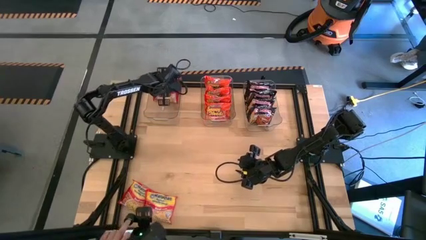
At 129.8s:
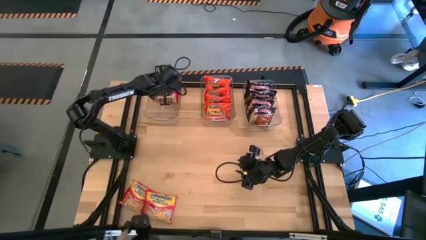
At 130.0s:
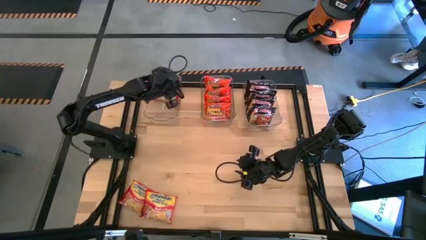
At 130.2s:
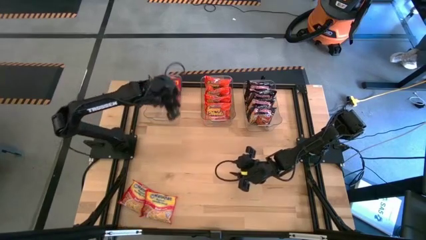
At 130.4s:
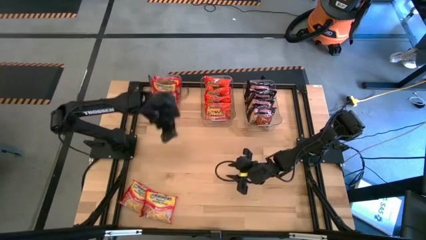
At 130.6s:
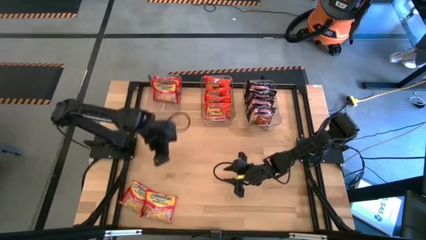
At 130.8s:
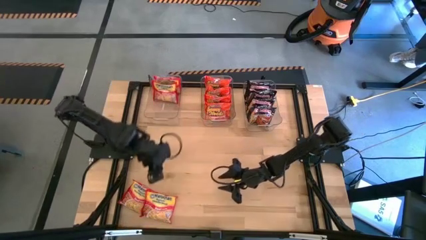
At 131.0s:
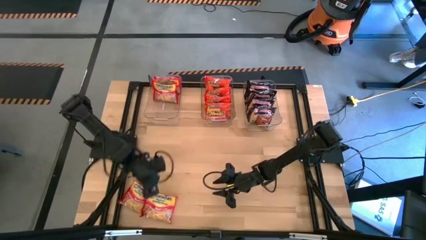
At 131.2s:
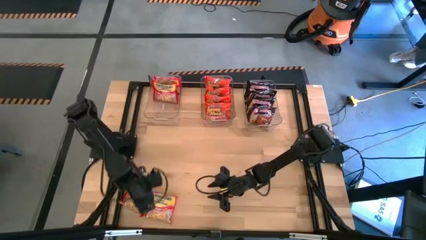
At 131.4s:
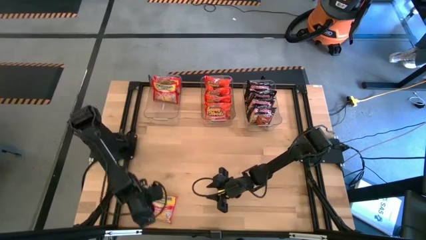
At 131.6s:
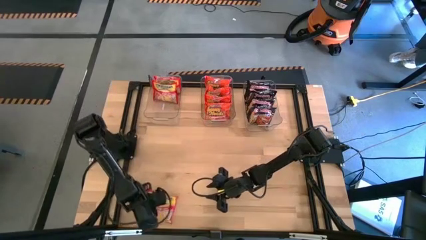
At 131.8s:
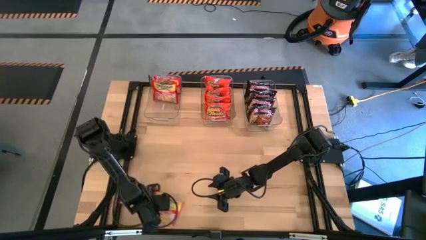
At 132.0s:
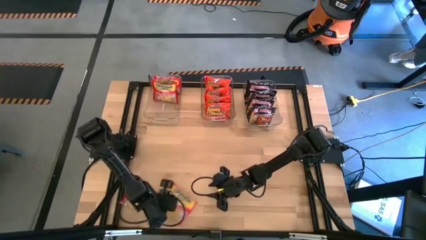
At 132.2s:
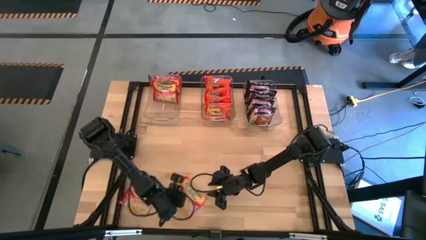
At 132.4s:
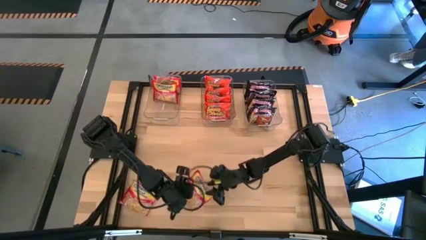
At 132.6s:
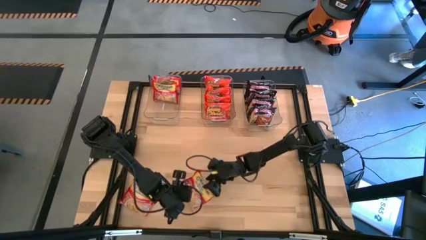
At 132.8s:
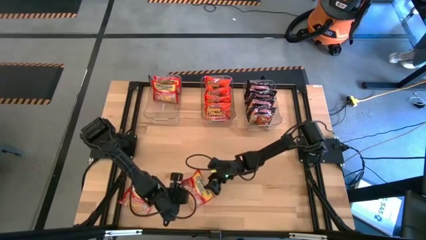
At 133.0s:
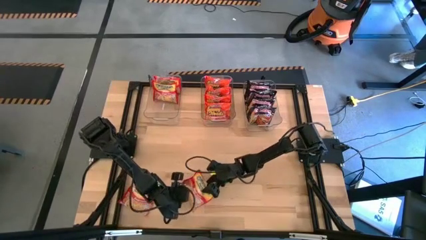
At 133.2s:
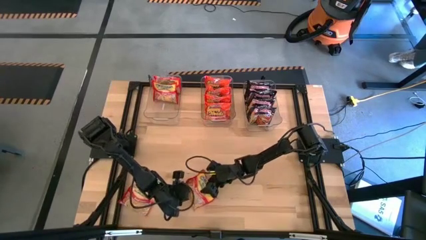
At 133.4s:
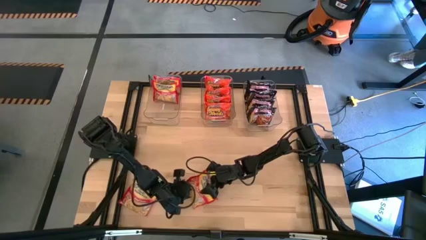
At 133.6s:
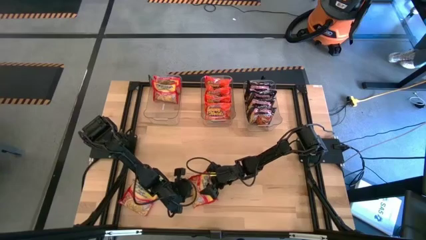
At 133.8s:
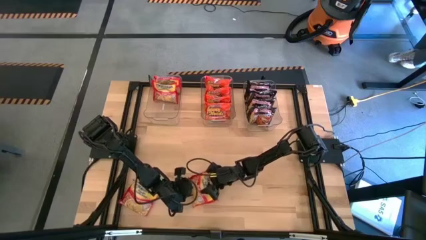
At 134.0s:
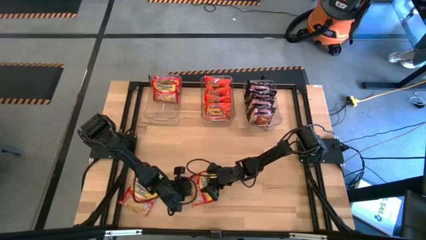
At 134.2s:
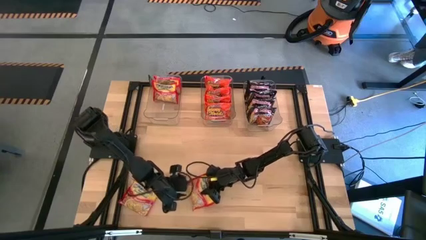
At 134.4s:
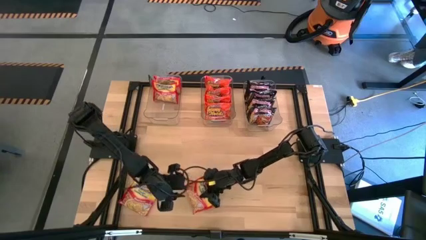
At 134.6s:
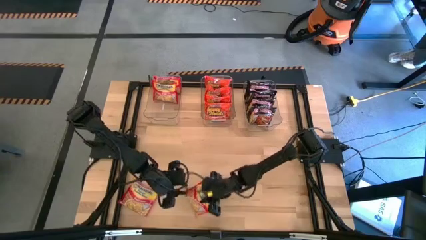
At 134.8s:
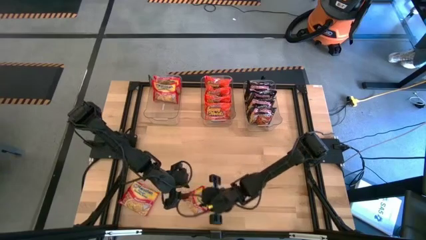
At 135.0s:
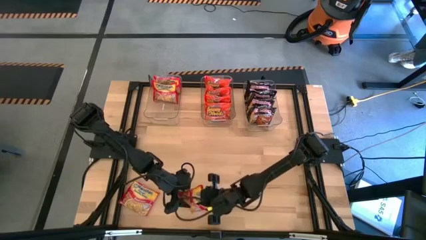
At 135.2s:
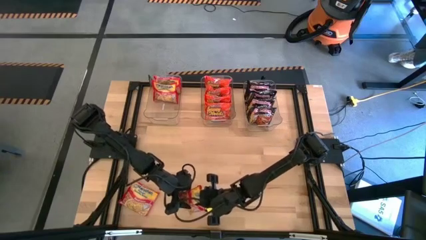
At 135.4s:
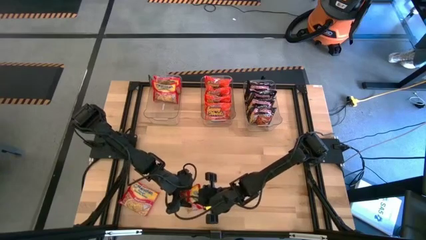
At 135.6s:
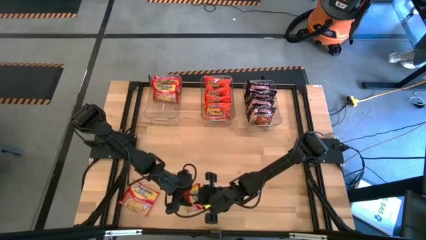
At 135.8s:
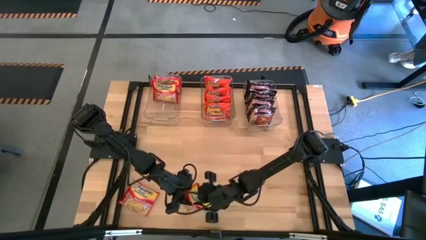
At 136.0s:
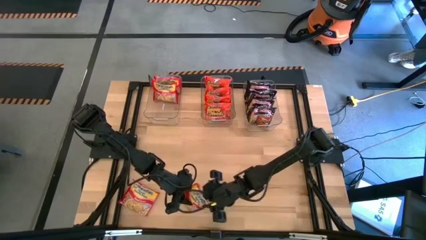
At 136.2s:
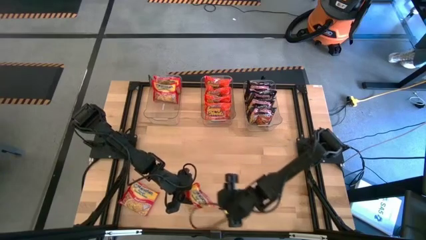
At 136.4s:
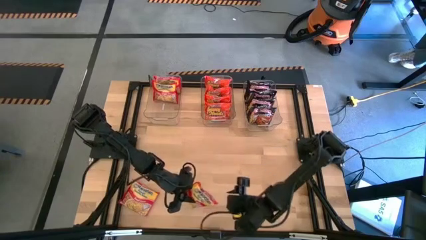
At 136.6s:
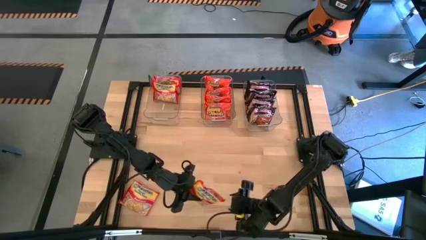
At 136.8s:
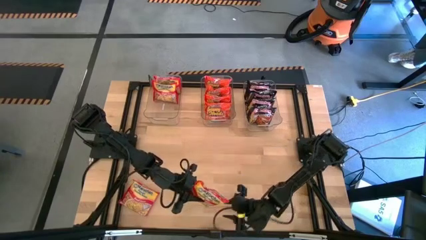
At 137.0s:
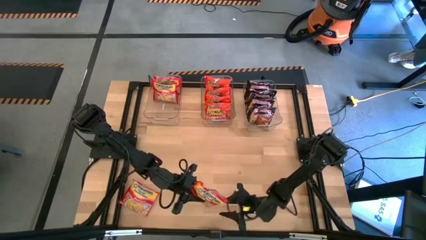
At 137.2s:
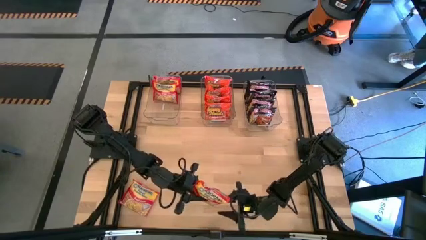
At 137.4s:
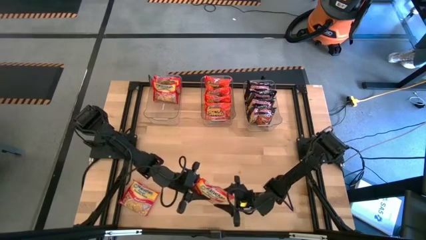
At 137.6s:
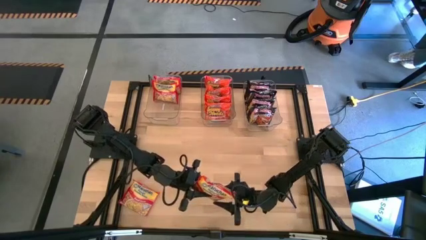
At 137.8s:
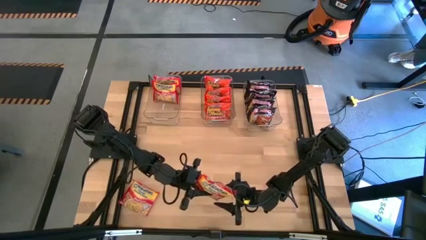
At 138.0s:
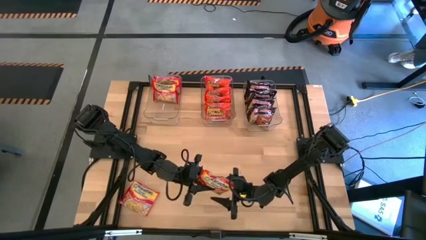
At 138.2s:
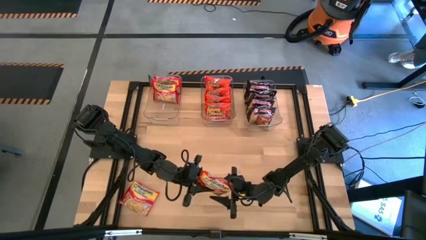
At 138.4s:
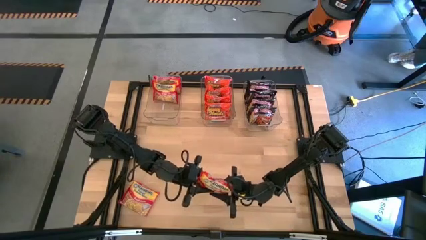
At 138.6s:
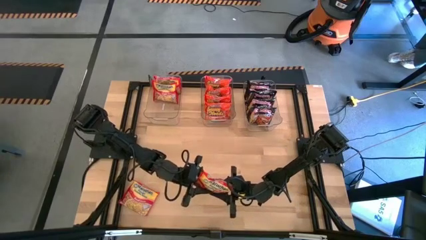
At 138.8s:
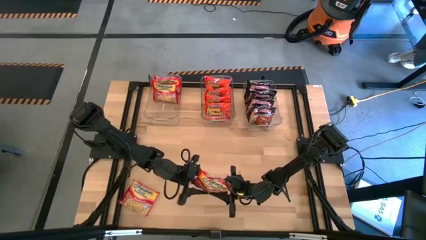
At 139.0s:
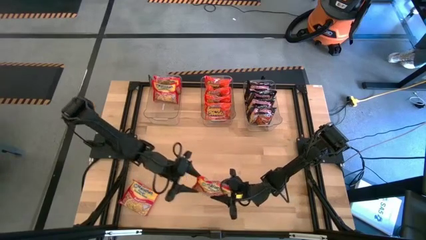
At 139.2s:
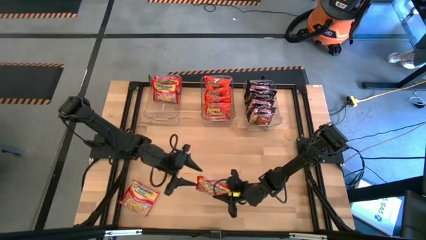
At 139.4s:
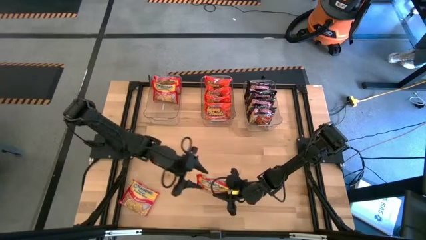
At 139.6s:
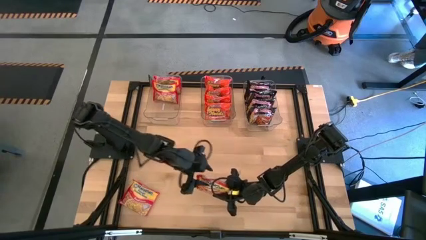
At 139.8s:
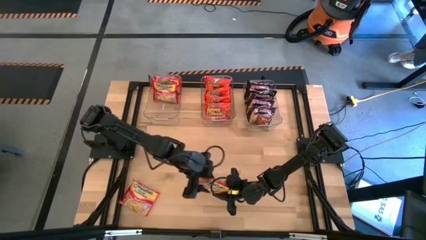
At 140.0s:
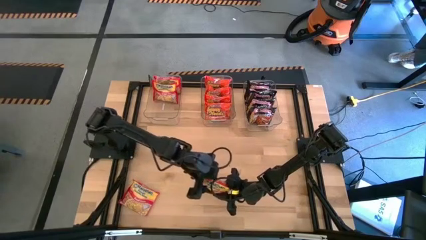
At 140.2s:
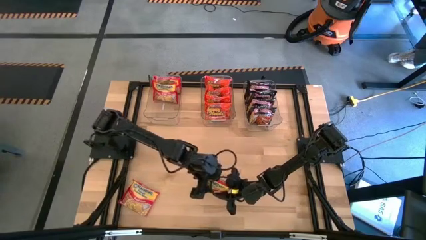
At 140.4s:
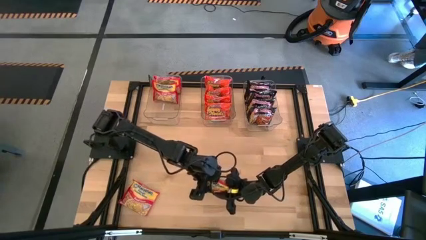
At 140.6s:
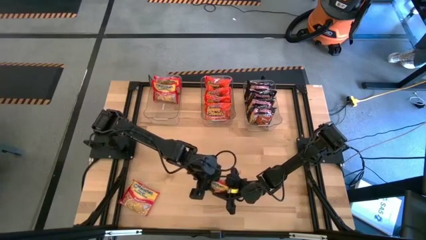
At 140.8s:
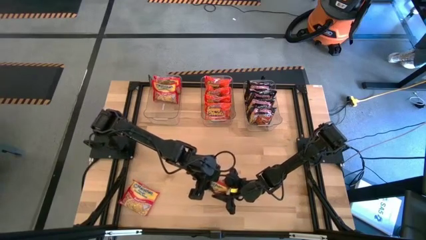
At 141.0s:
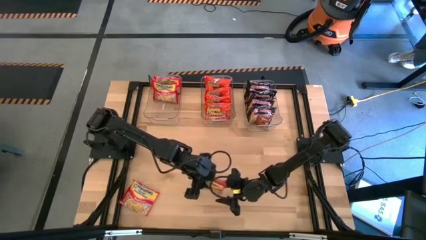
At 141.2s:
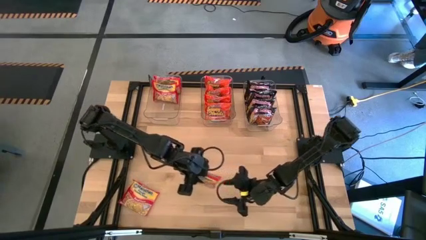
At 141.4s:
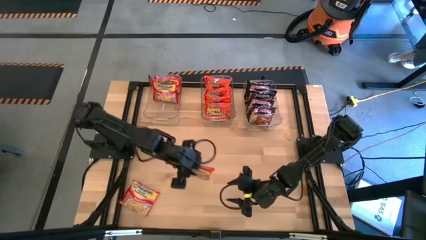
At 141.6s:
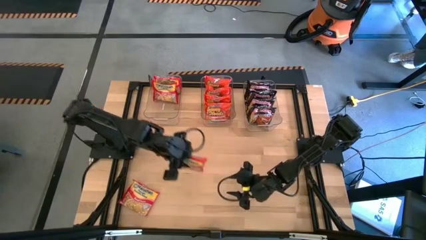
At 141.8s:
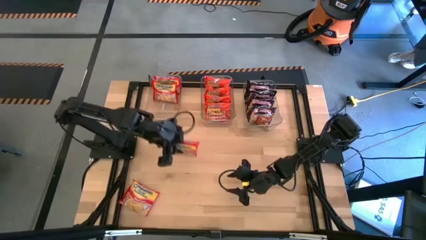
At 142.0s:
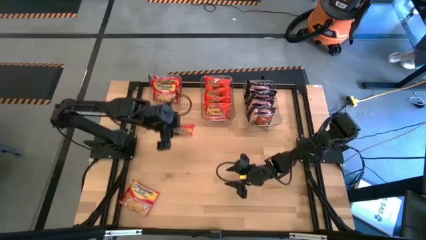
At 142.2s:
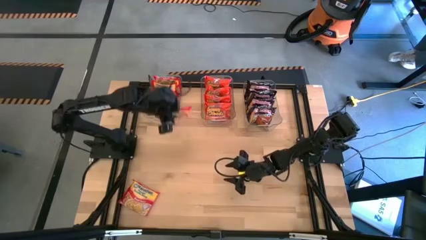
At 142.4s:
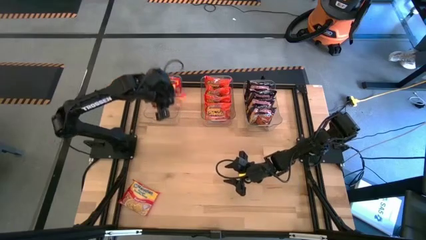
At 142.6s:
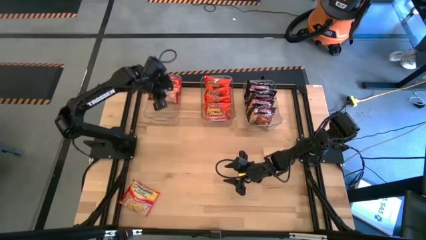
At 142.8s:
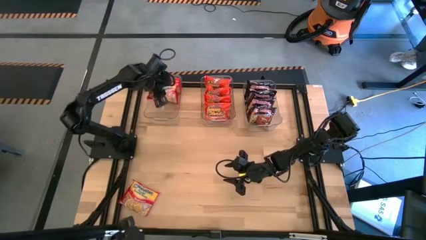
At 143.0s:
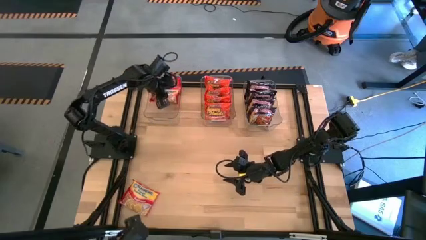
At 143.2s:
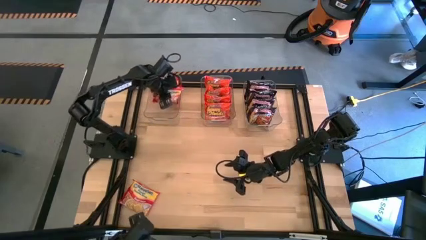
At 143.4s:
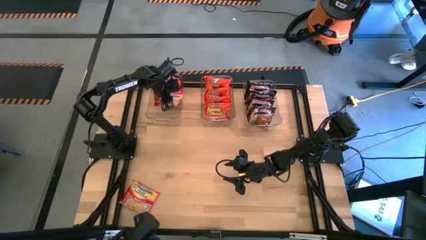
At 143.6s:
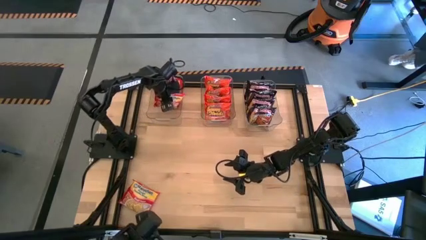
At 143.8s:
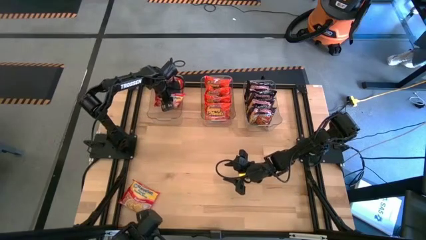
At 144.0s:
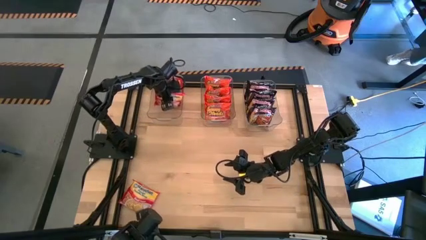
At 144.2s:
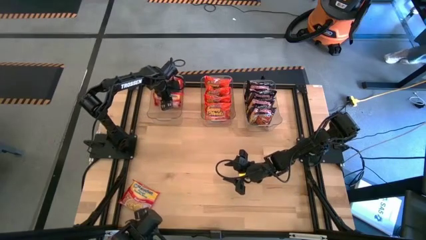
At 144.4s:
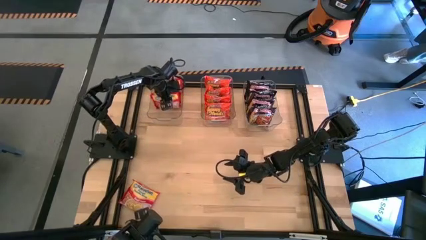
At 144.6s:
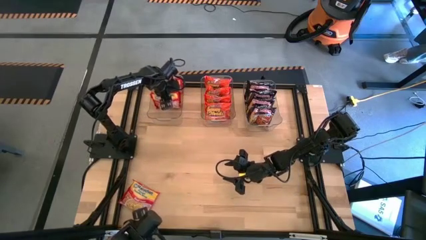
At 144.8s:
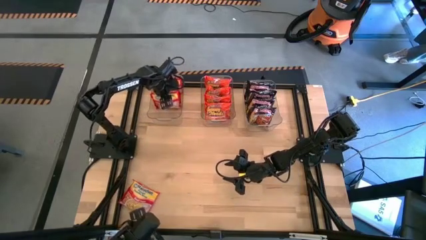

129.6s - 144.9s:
Task: Sort Maruchan noodles
Put the red noodle pack into the left transparent bin
